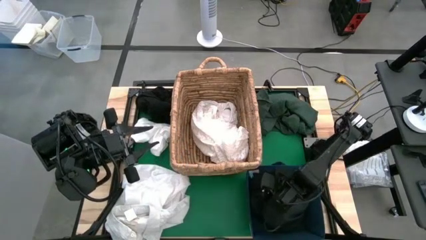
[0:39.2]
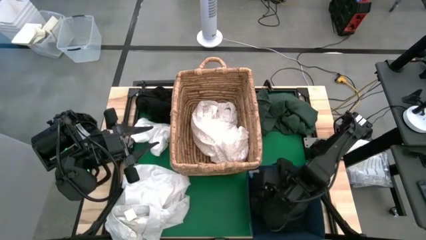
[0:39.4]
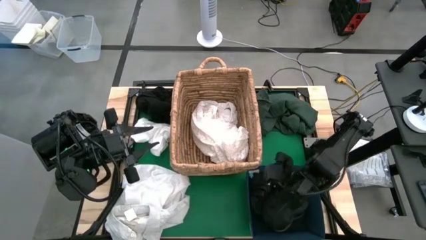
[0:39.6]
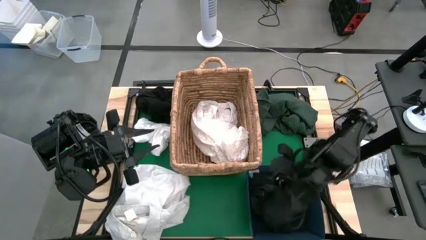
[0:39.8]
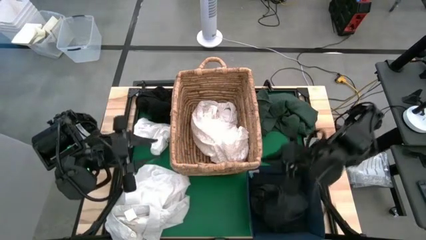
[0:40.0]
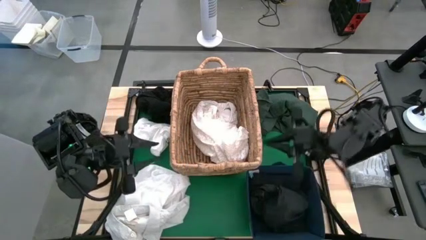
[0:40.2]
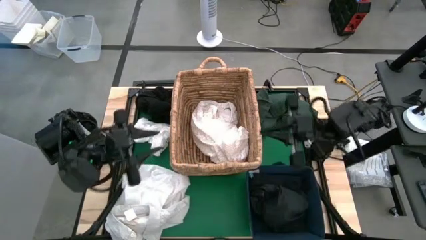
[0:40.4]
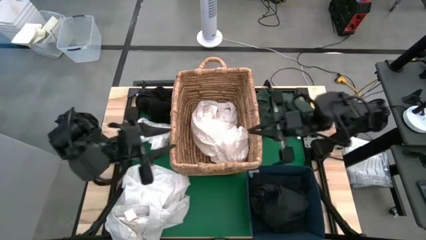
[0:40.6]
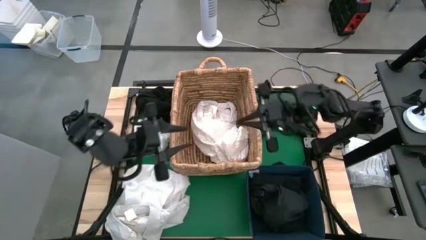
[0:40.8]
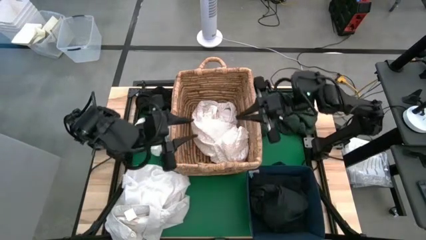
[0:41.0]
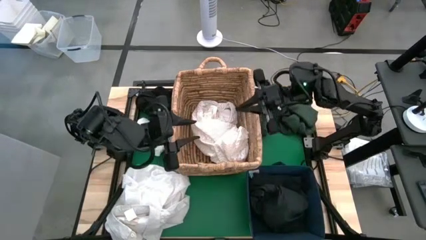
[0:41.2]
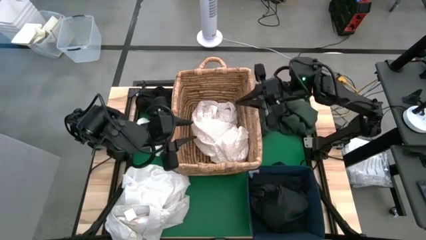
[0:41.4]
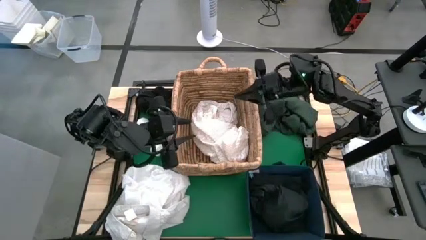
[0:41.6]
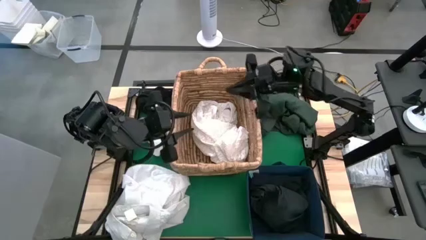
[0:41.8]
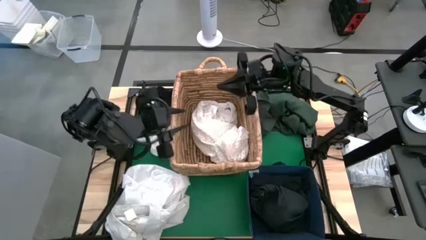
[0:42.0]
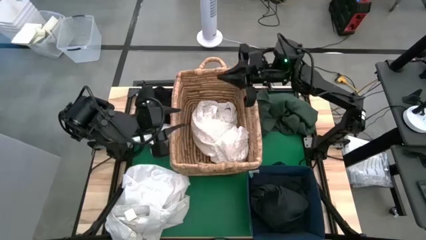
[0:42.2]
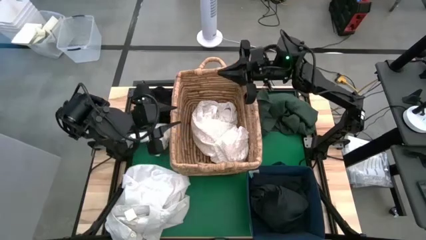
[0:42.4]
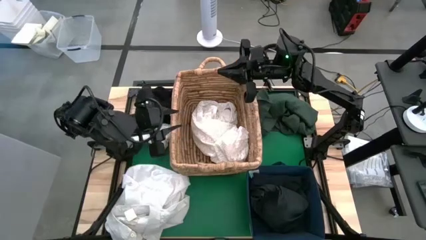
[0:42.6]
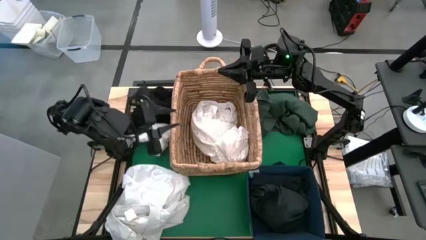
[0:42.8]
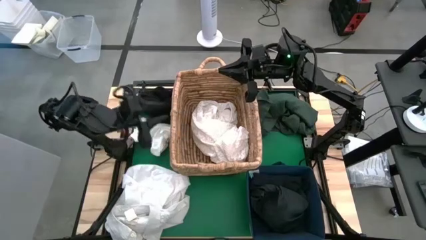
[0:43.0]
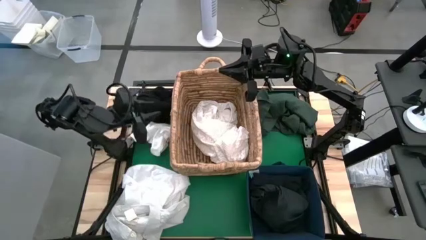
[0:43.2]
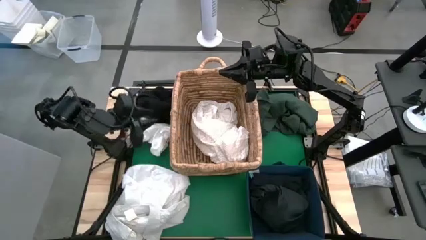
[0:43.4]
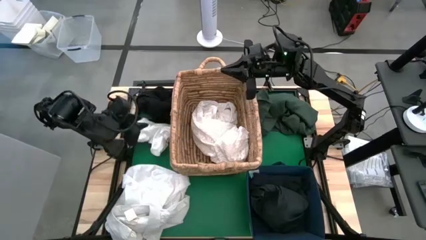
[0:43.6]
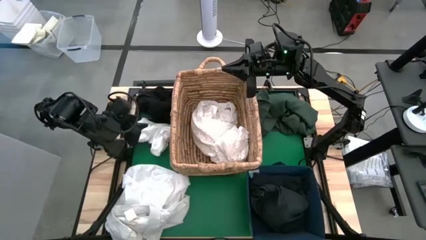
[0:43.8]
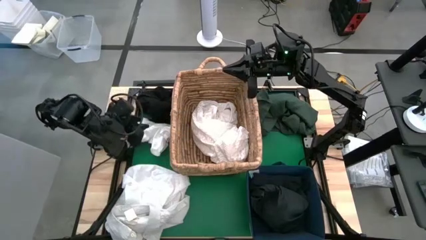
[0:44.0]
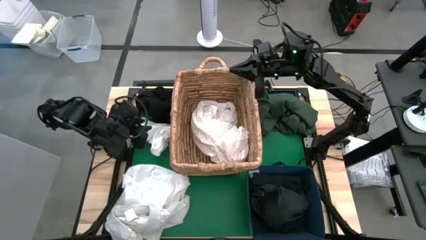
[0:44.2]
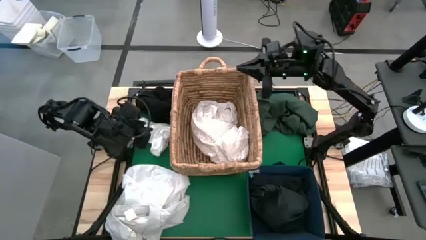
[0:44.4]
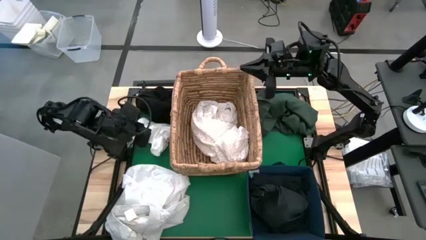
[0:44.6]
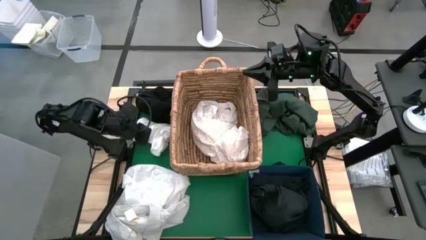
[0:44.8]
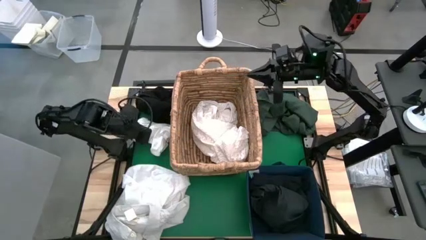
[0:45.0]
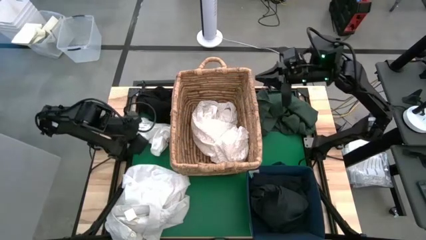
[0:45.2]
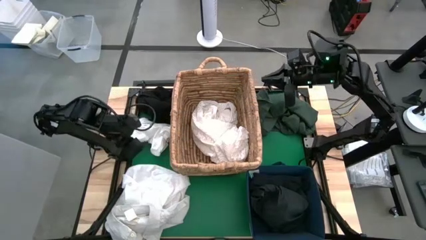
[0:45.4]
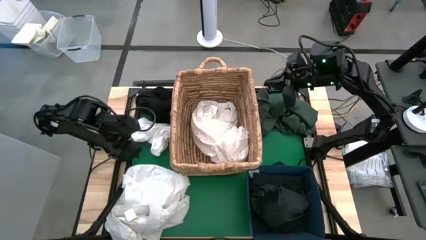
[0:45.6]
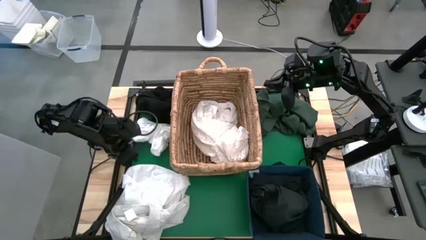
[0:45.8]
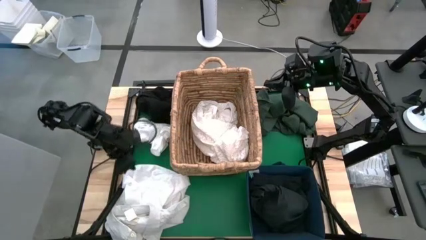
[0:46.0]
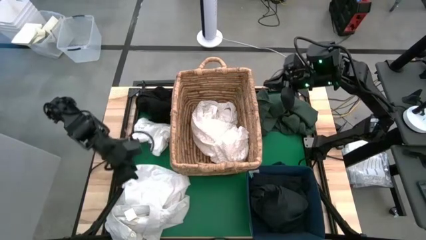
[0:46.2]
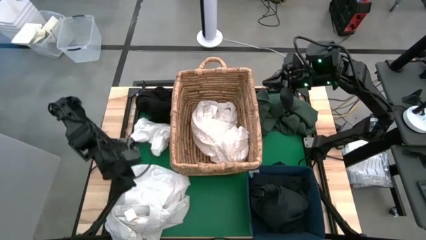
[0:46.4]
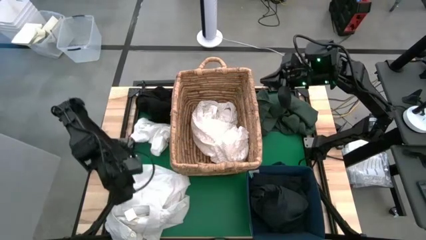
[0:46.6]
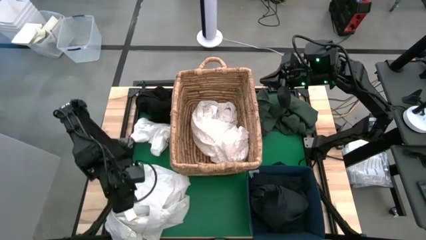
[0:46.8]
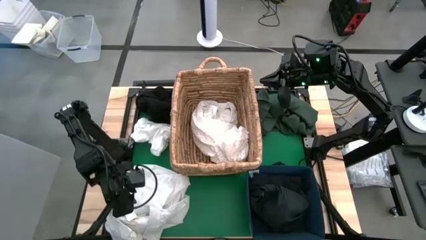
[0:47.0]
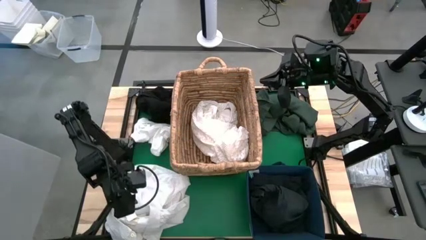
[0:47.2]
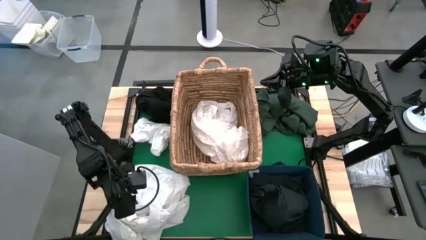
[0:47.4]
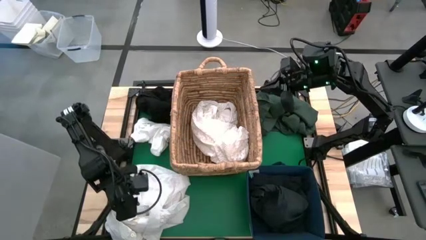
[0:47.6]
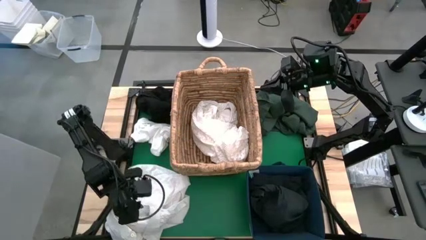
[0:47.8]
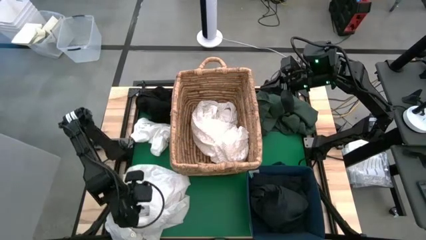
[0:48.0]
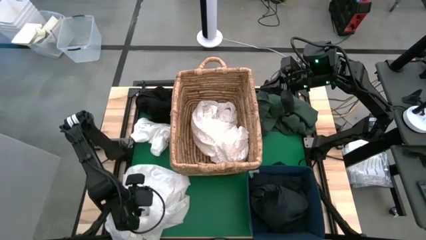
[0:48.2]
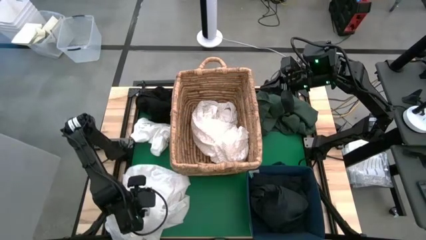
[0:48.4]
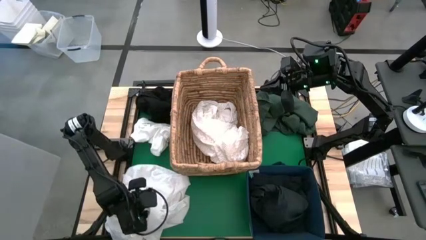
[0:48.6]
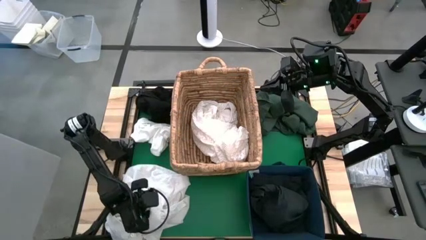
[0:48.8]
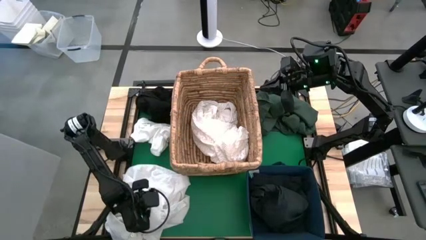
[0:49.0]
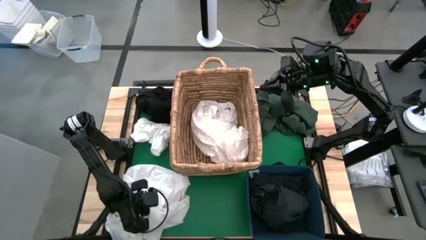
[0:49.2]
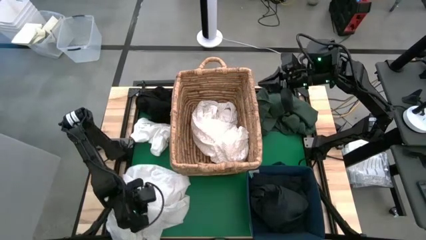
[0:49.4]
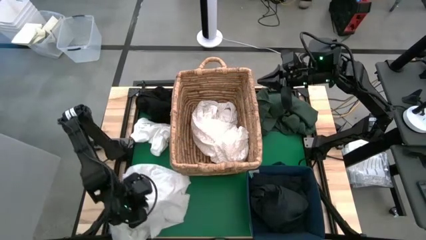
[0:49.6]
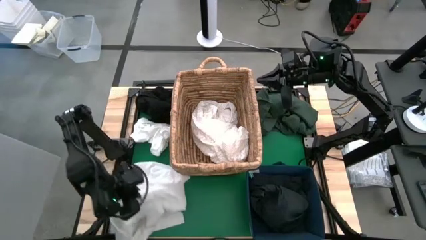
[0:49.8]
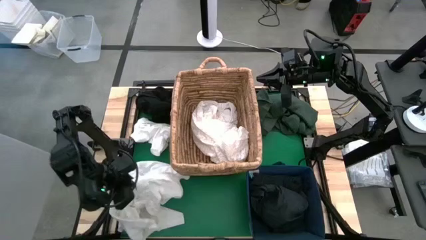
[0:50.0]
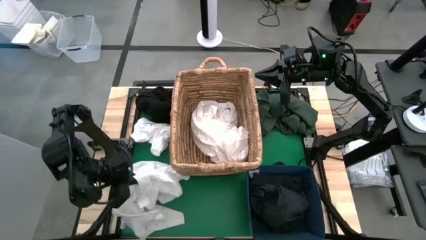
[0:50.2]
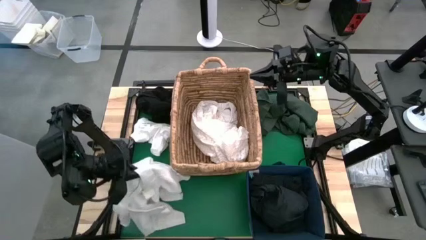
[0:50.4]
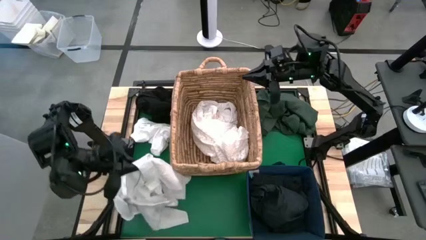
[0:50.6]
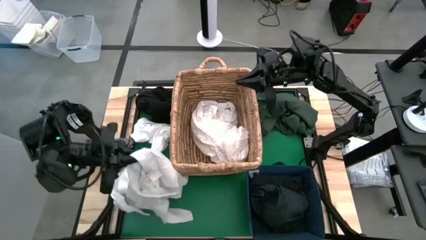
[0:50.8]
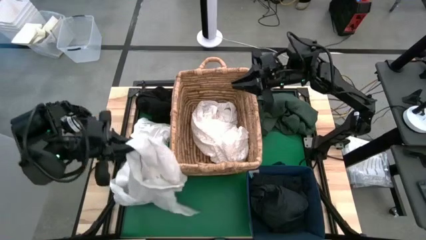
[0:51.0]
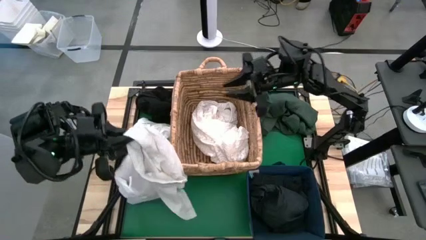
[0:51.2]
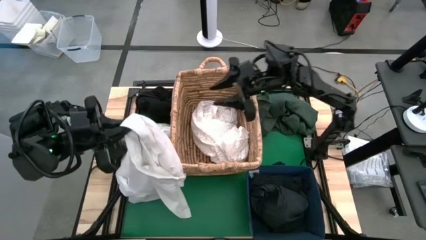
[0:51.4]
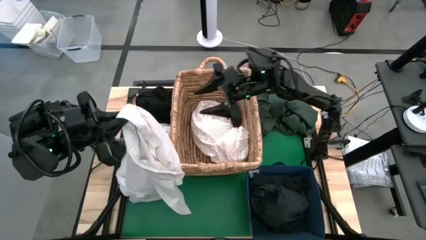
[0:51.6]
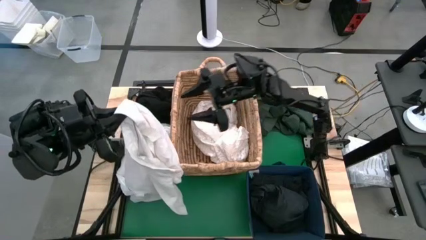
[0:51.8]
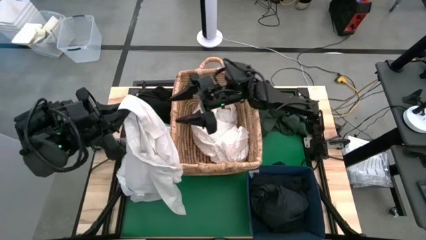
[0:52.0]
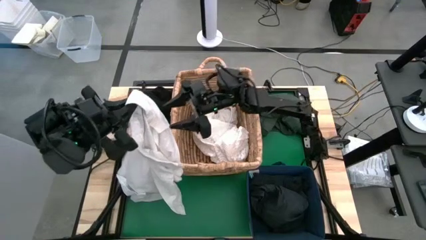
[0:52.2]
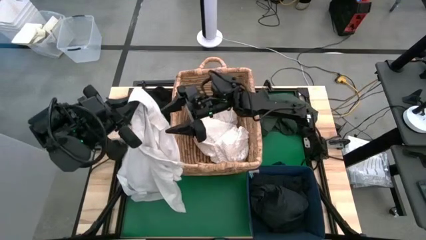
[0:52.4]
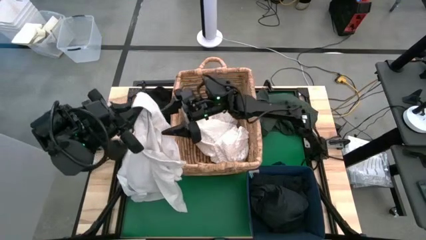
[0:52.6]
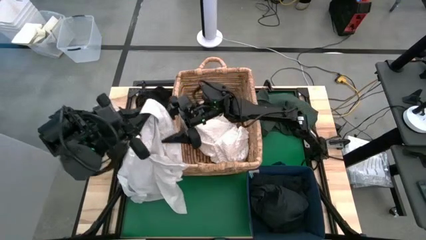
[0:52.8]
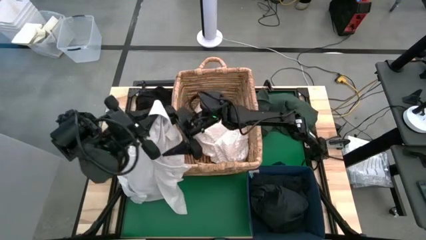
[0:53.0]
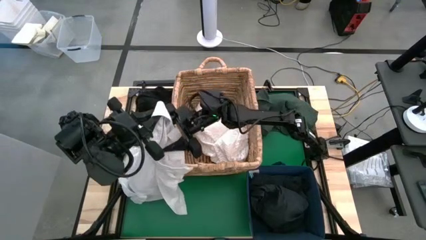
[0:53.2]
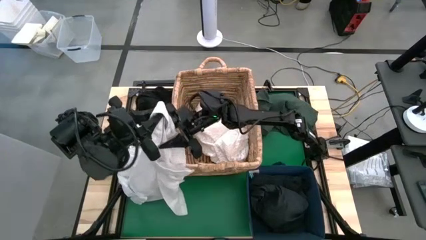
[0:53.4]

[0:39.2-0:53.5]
Put the white polo shirt into the basket

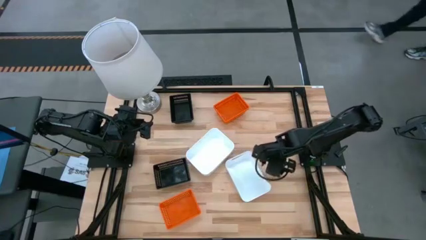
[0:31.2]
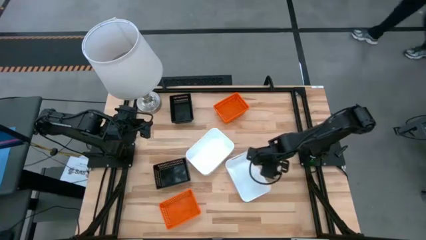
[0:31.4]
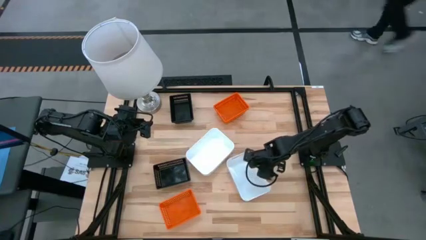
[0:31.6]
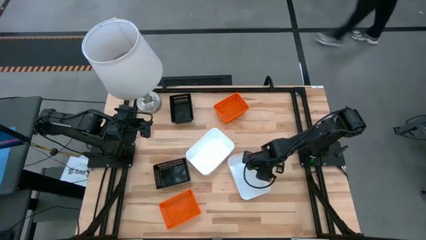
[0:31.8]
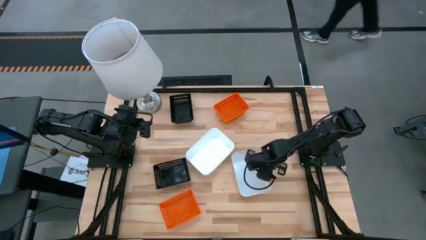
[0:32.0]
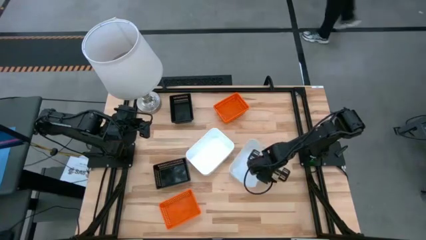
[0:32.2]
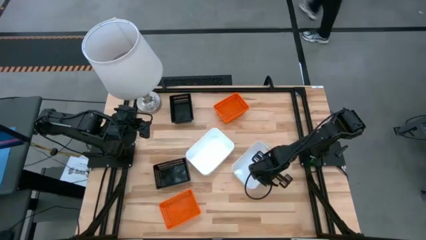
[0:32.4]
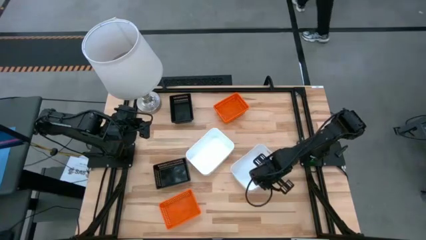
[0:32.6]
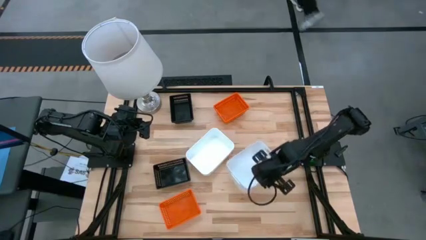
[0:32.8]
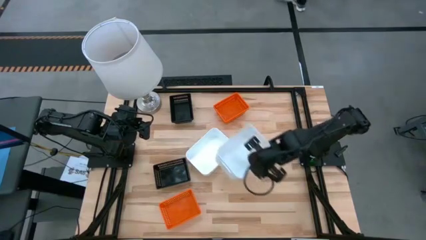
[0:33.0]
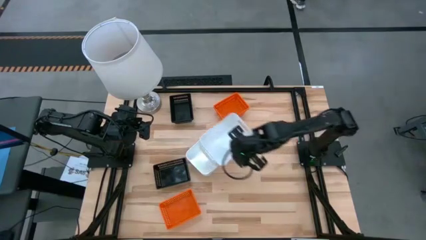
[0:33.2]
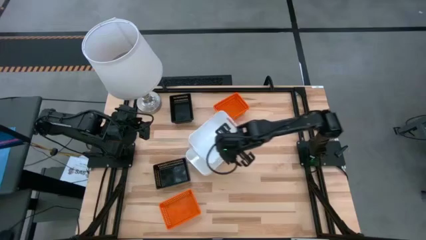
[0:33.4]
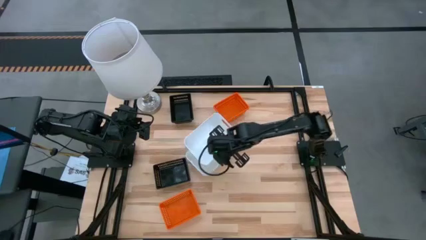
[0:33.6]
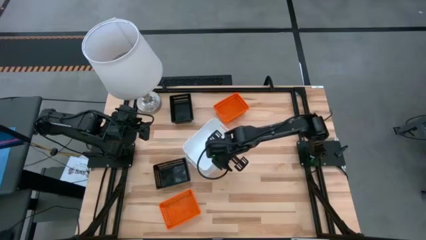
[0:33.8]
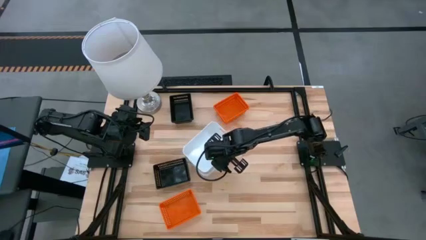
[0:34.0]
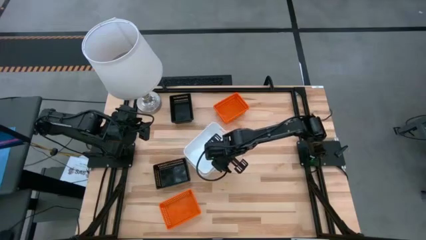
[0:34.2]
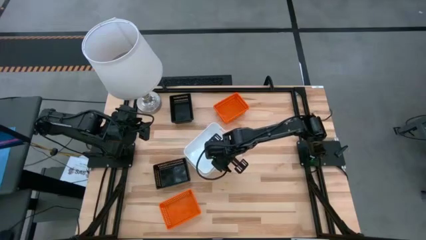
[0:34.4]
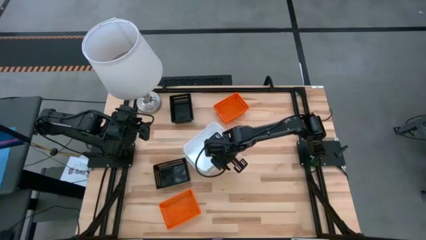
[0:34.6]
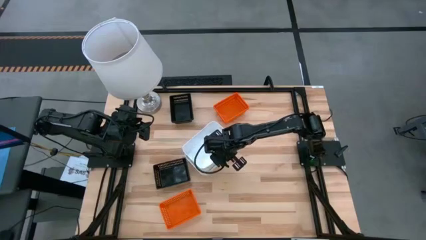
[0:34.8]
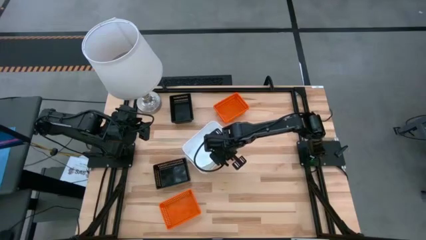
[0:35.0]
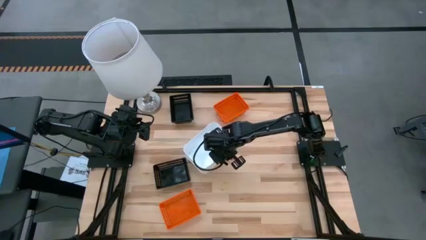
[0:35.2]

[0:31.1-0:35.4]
Stack the white bin on top of the stacked white bin
